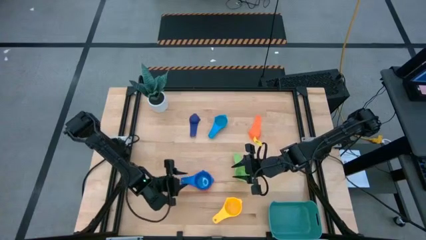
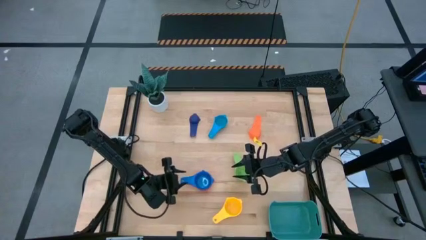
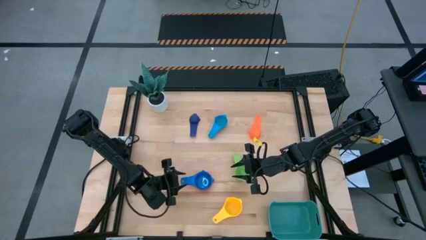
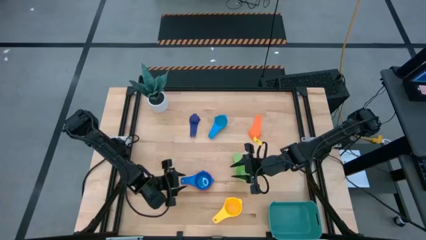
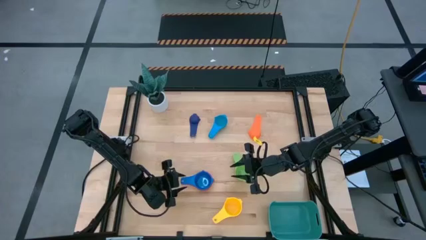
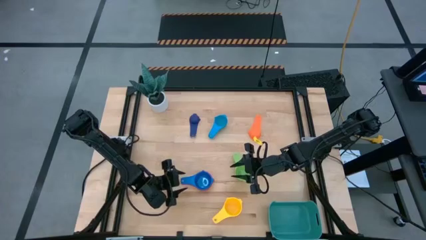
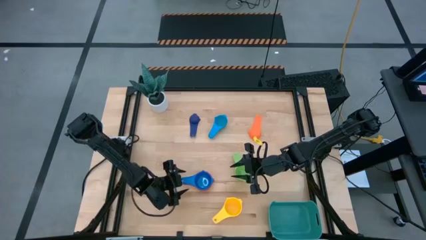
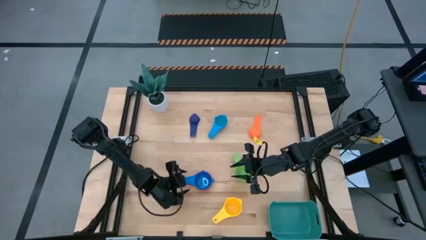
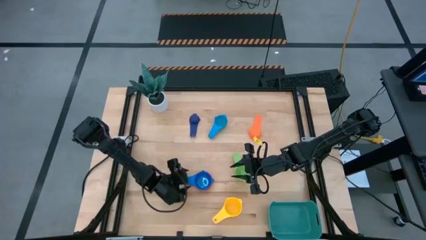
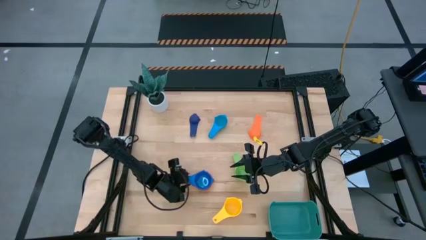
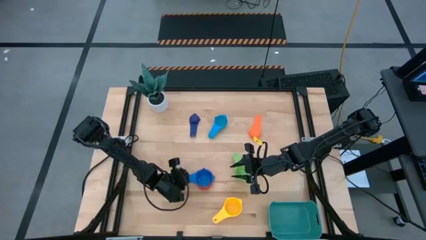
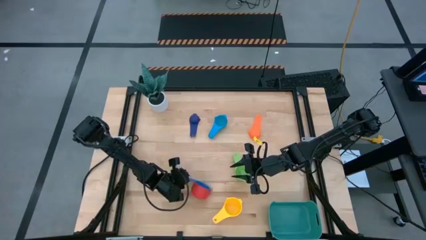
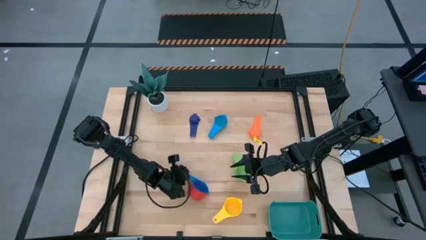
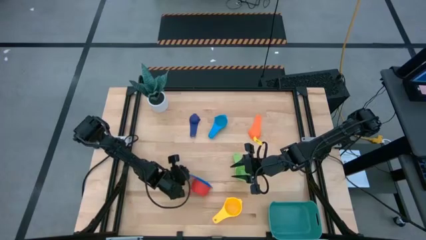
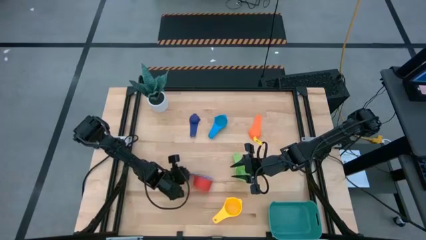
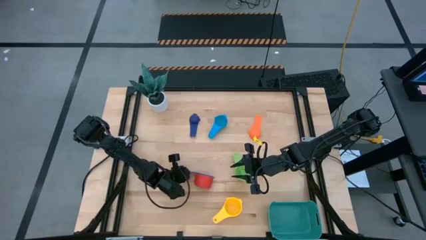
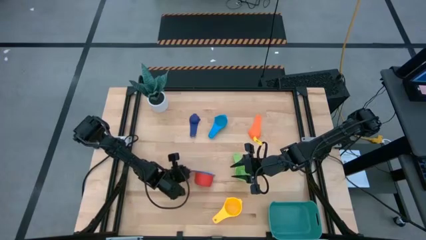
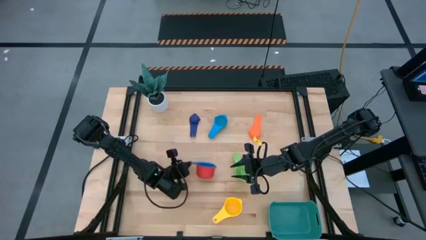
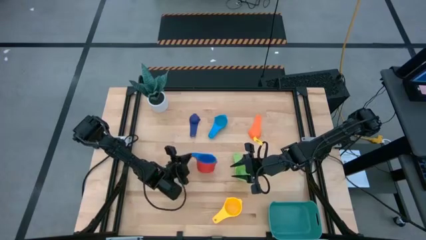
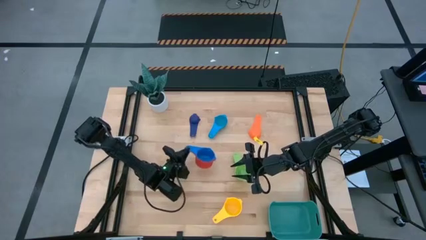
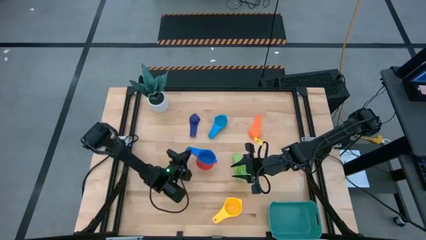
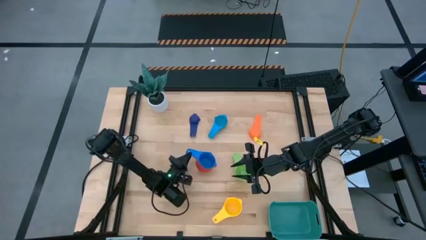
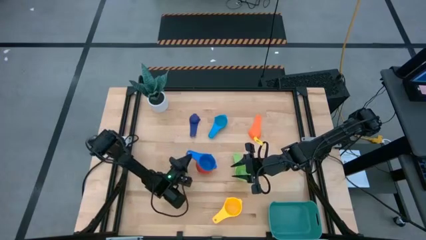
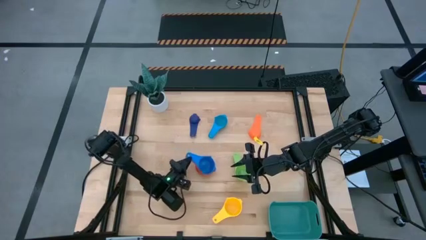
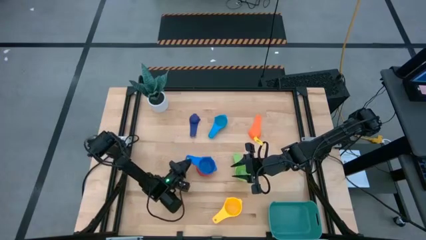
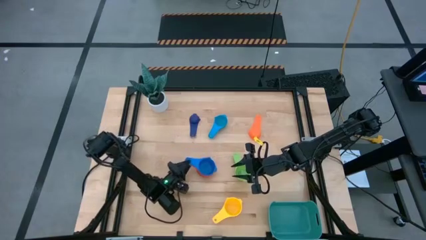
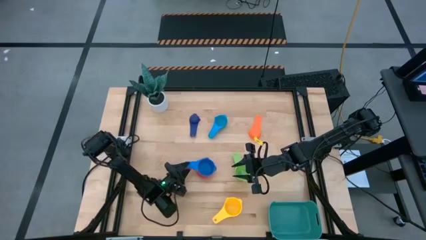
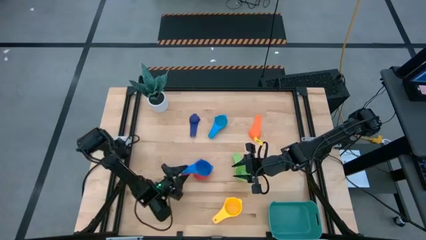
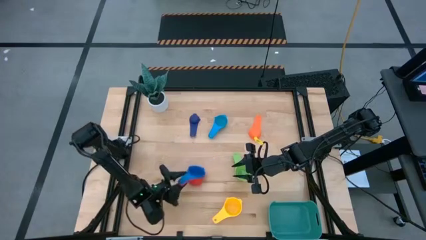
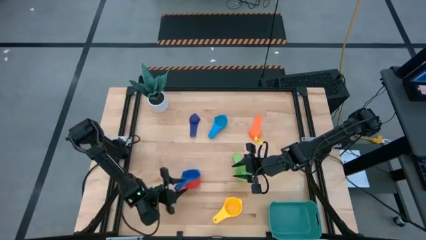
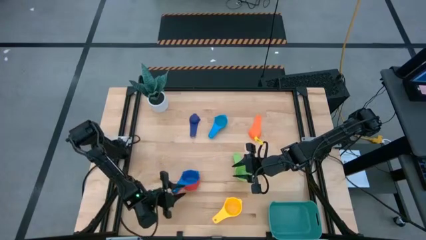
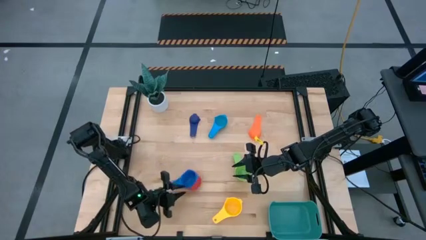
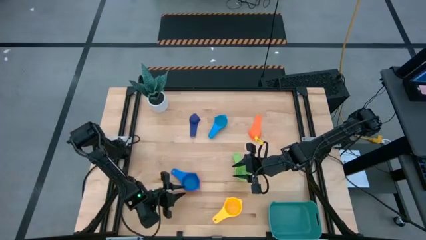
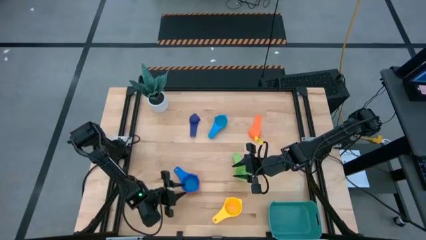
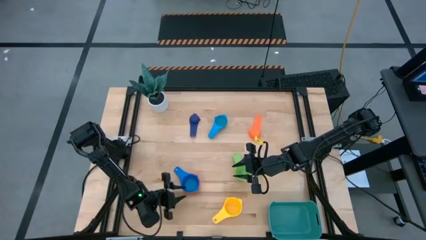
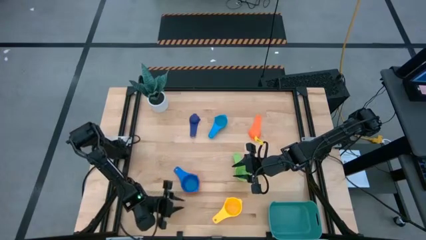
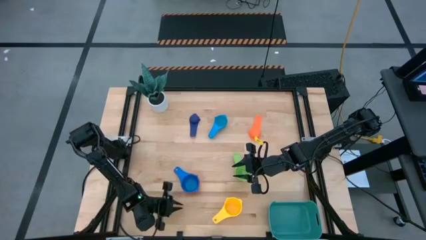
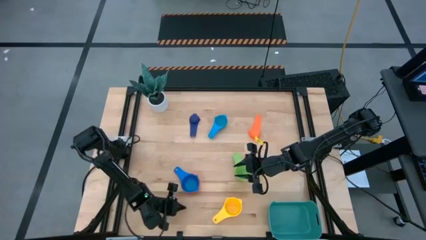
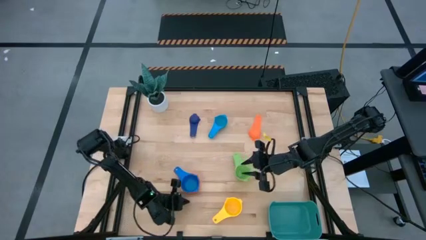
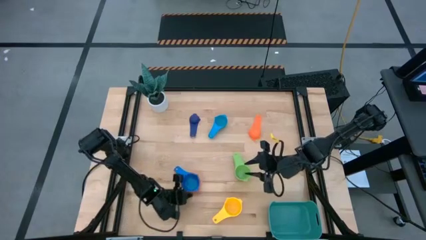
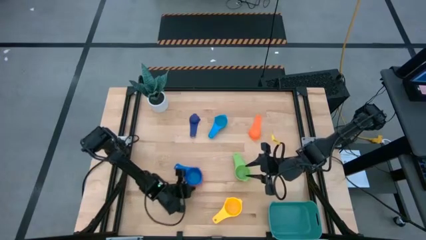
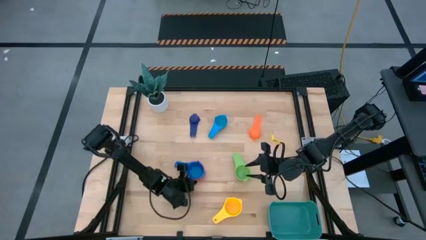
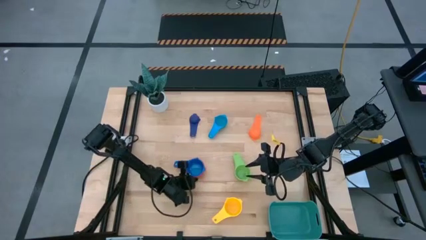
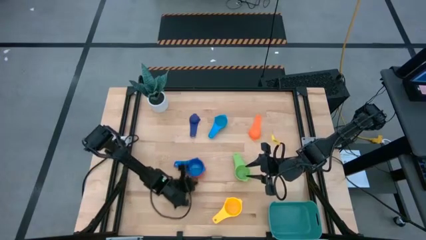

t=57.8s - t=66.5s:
Task: Nest measuring cups in basket
Adjust the stacked measuring cups

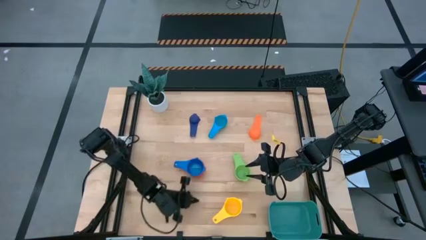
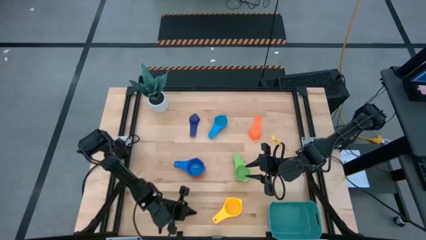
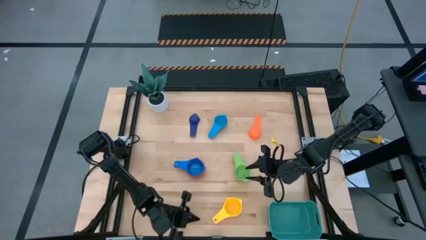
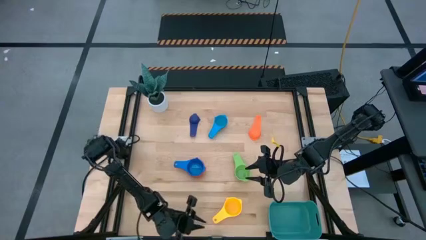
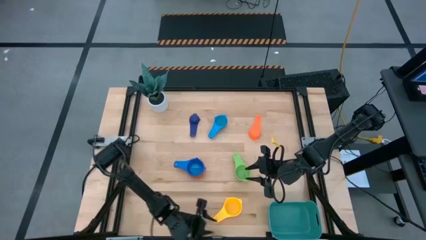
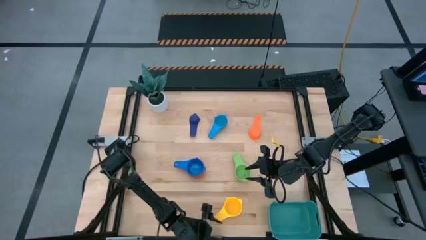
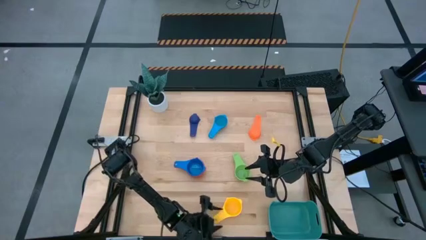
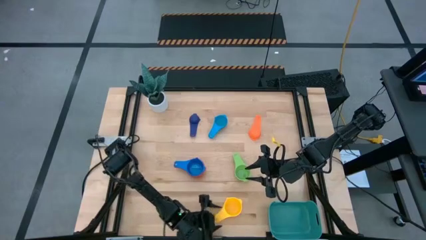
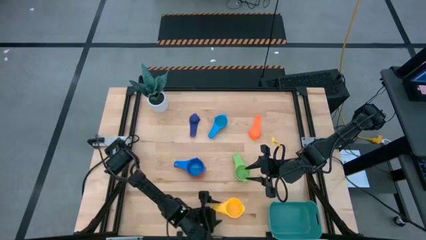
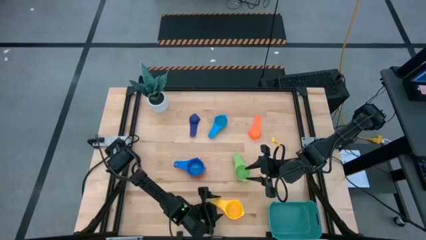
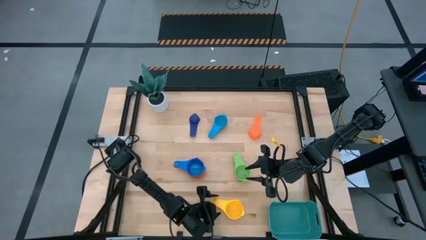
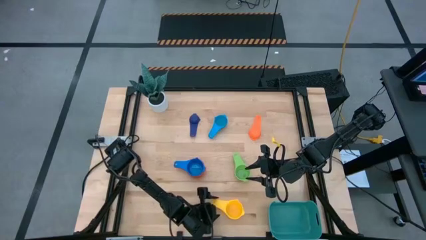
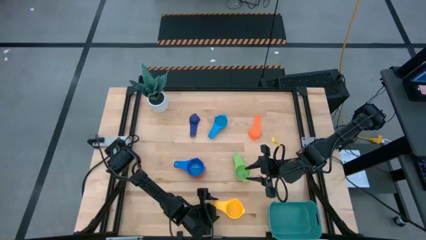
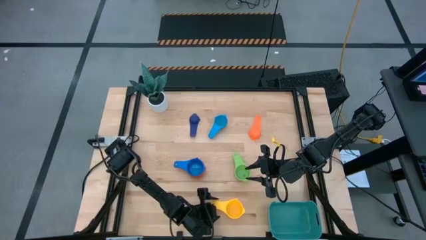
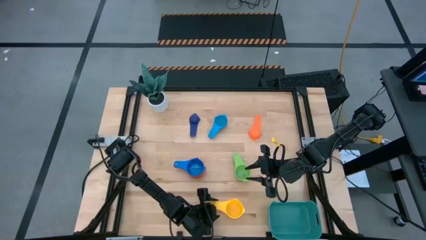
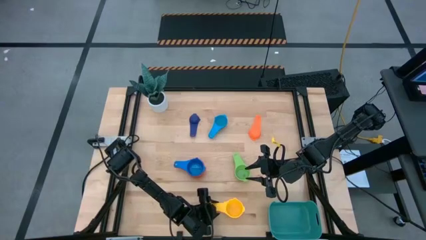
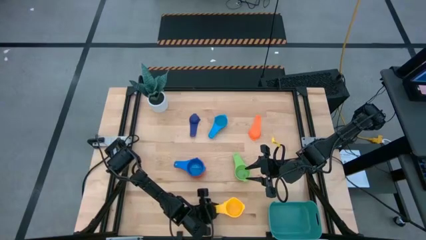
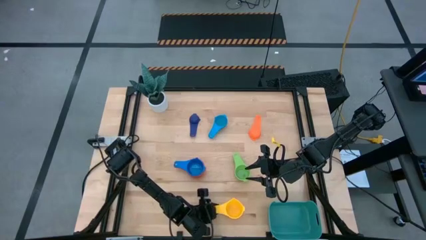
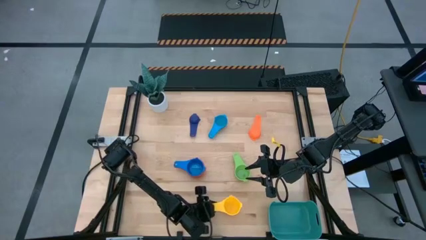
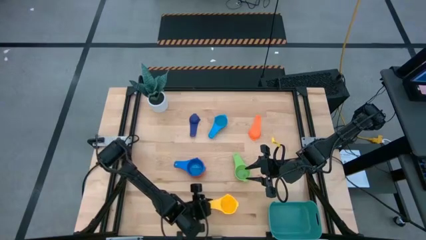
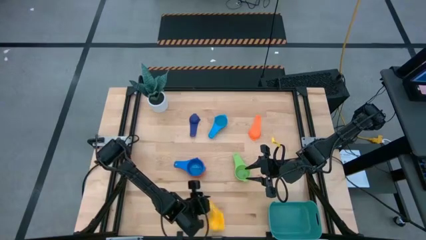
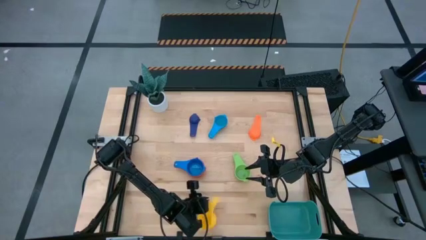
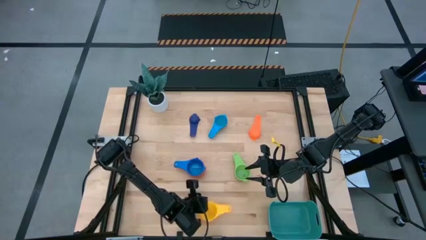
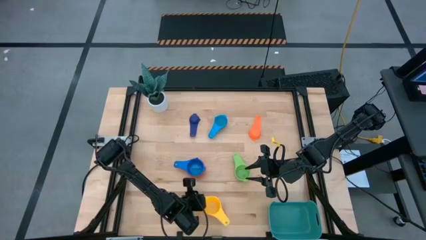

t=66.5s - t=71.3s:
Stack the yellow measuring cup on top of the blue measuring cup

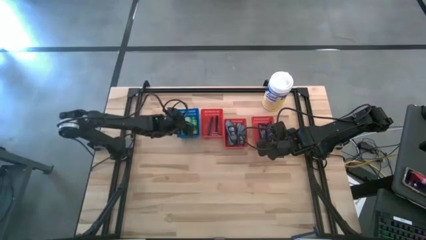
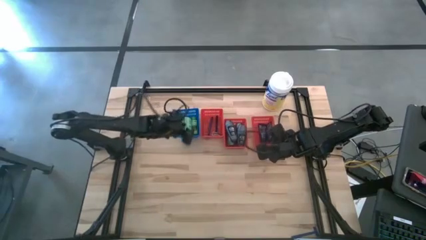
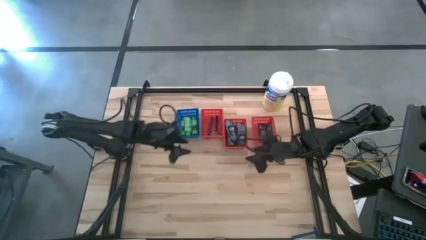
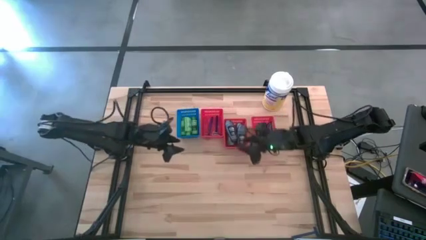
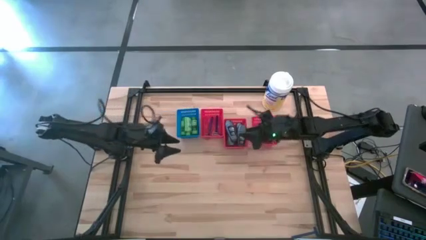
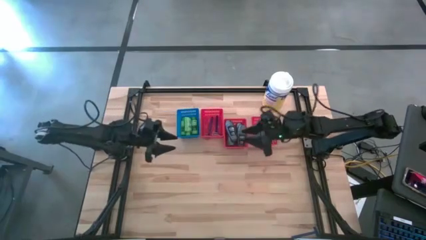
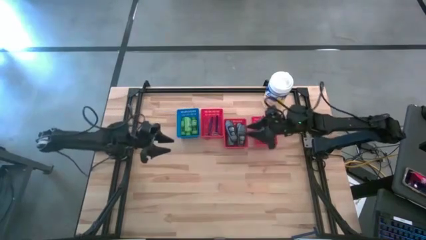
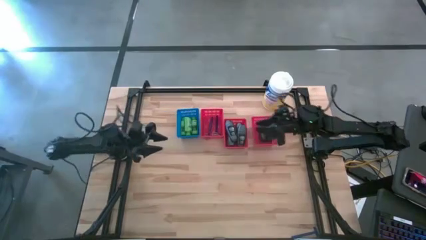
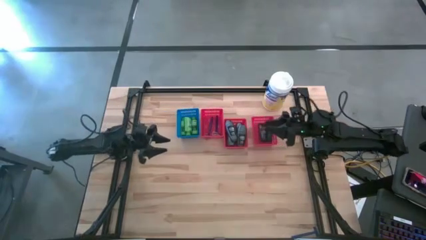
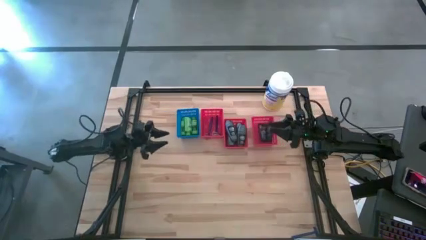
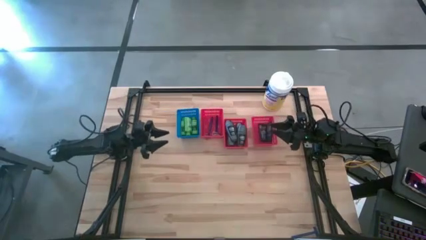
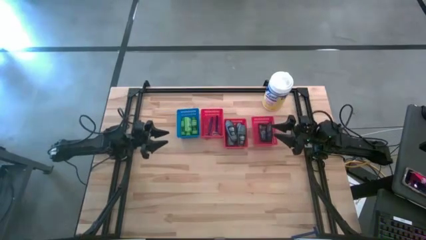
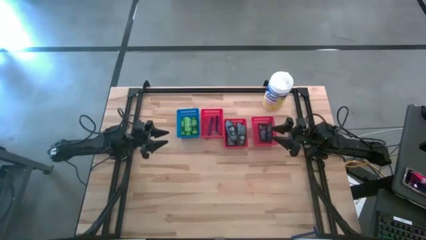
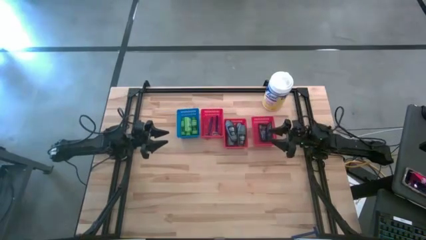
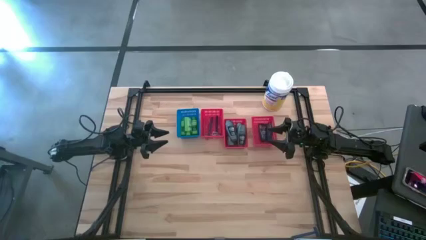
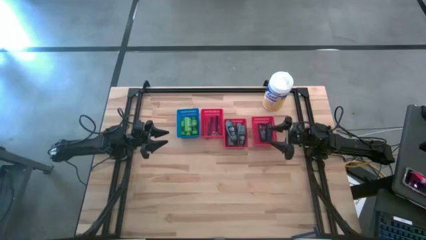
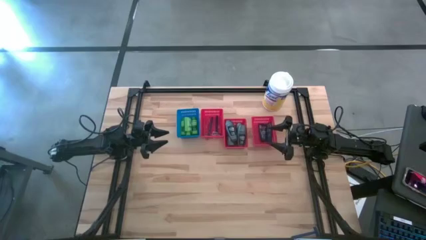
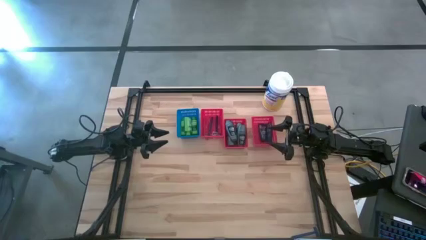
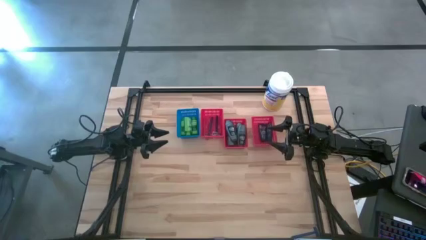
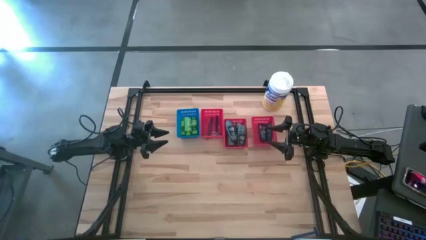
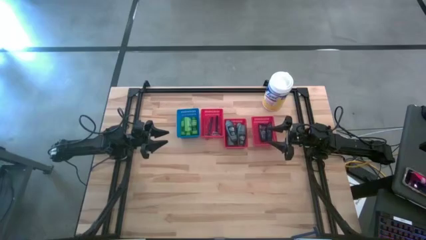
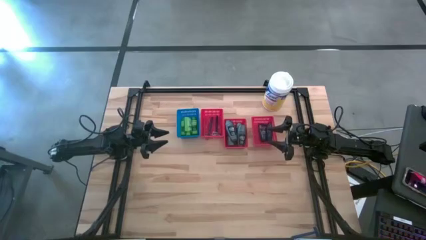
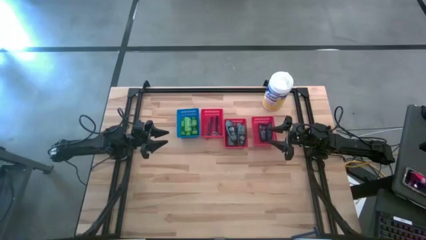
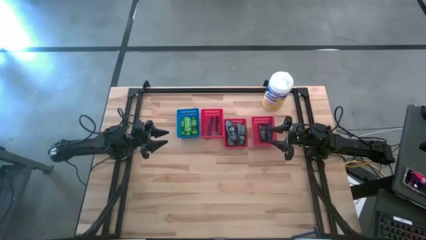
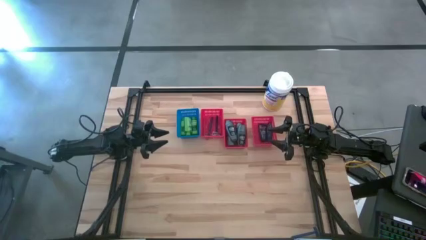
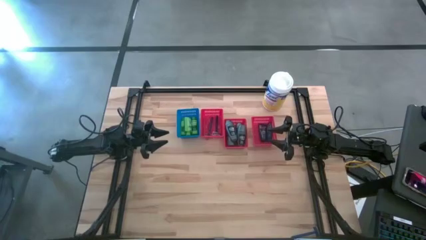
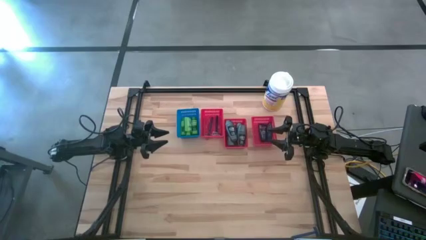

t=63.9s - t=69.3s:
Task: Pick & Place Travel size toiletries
Return to Home Position
